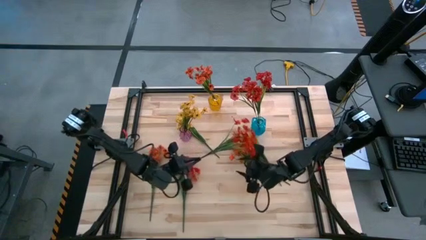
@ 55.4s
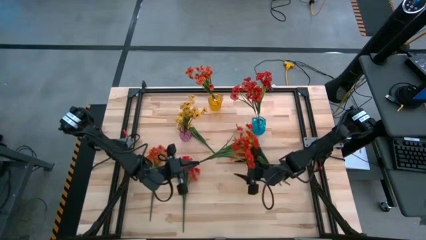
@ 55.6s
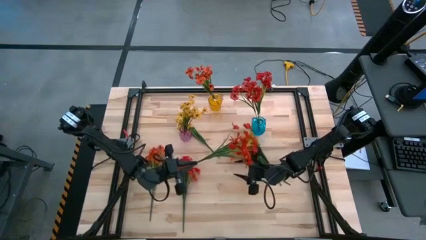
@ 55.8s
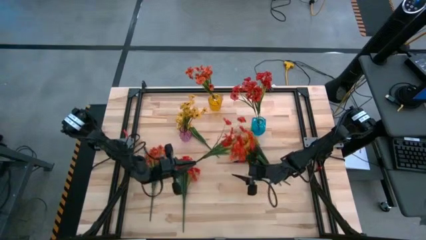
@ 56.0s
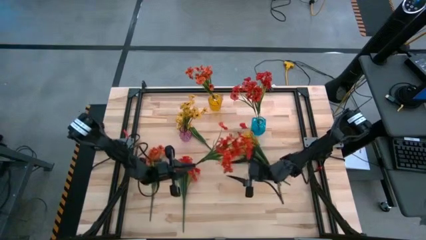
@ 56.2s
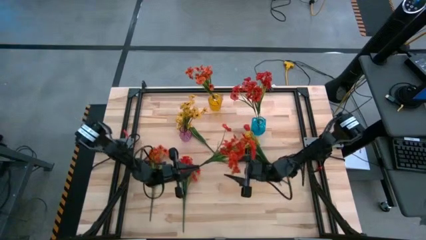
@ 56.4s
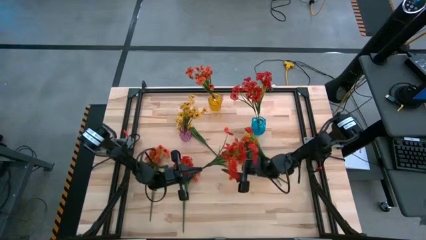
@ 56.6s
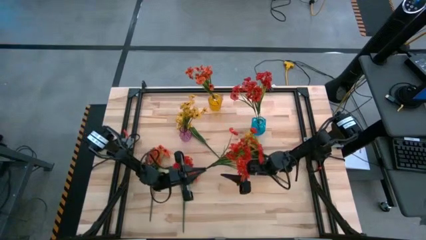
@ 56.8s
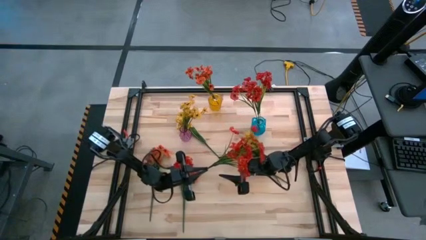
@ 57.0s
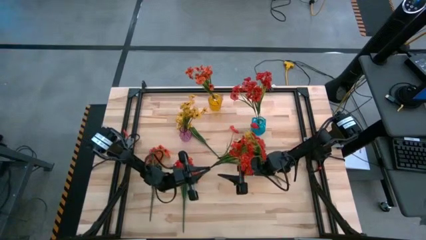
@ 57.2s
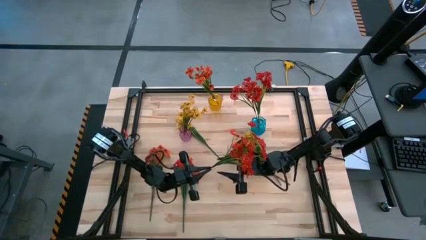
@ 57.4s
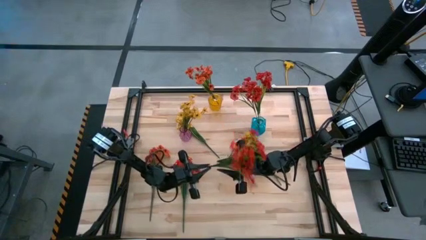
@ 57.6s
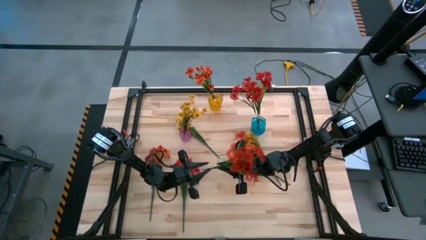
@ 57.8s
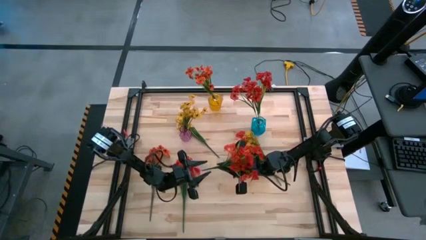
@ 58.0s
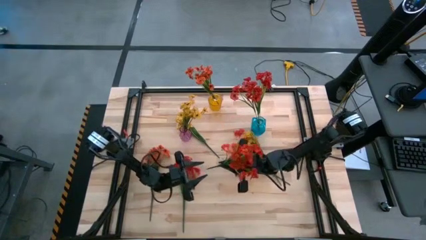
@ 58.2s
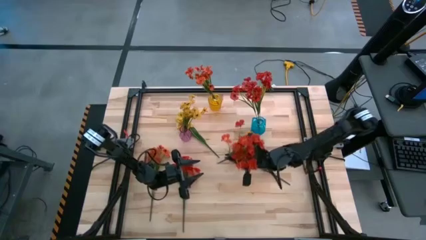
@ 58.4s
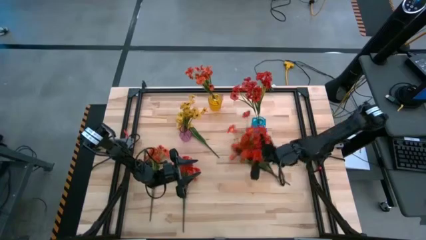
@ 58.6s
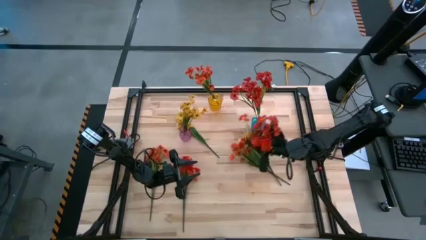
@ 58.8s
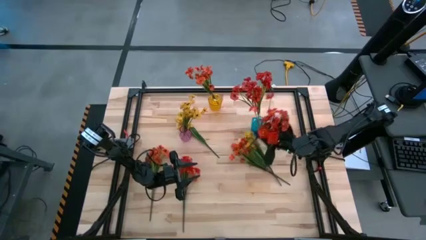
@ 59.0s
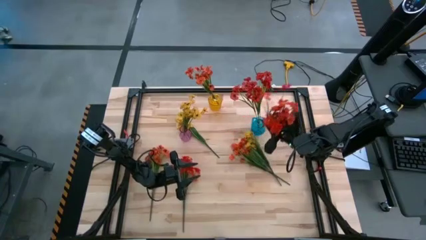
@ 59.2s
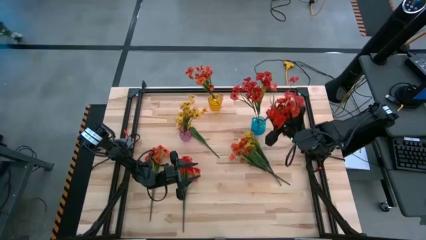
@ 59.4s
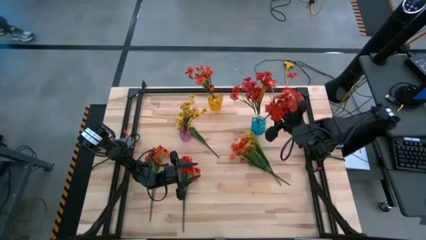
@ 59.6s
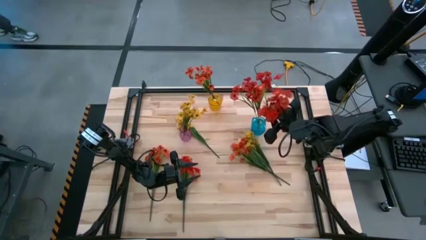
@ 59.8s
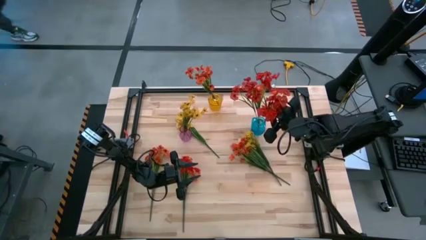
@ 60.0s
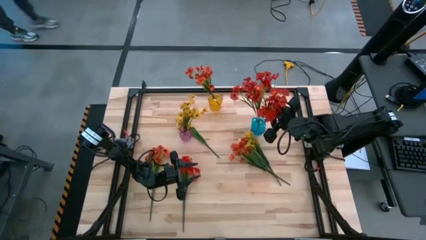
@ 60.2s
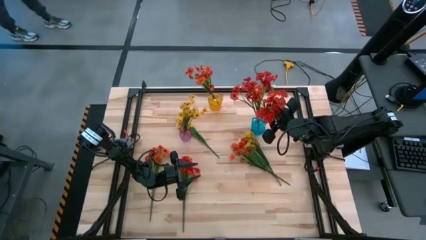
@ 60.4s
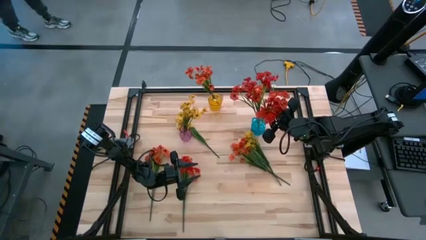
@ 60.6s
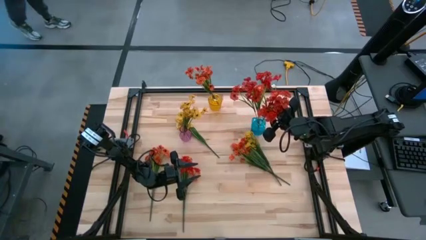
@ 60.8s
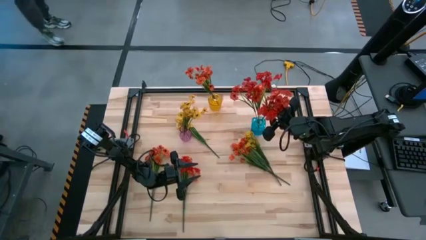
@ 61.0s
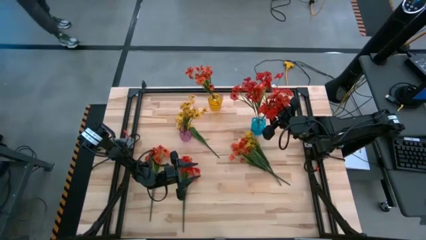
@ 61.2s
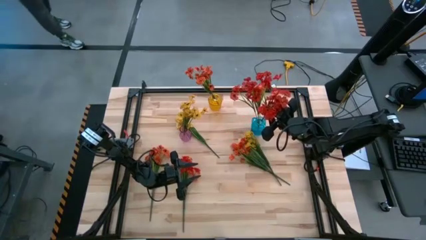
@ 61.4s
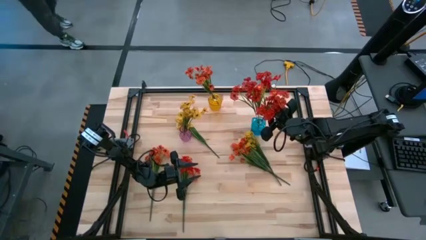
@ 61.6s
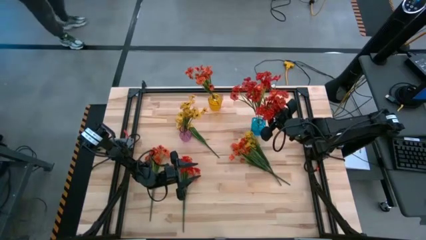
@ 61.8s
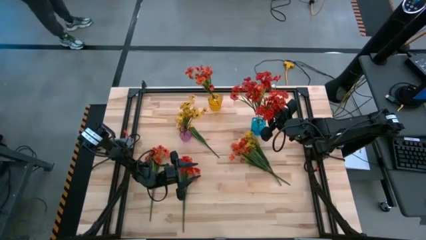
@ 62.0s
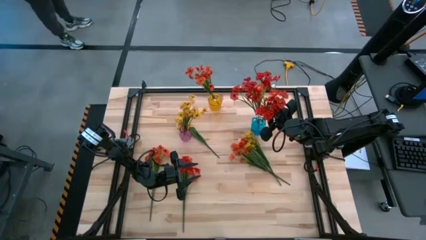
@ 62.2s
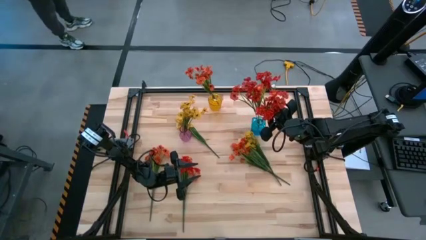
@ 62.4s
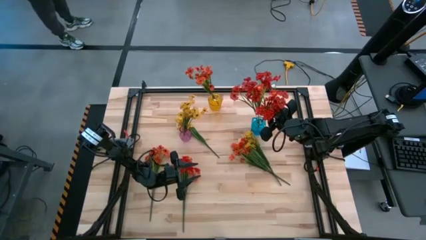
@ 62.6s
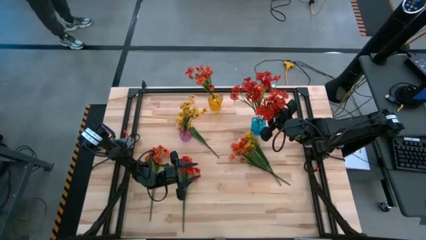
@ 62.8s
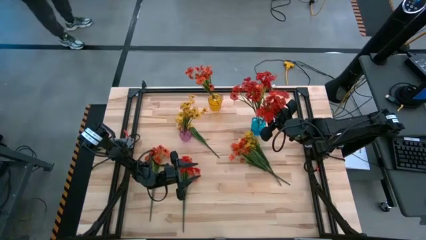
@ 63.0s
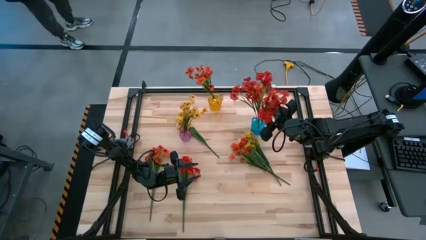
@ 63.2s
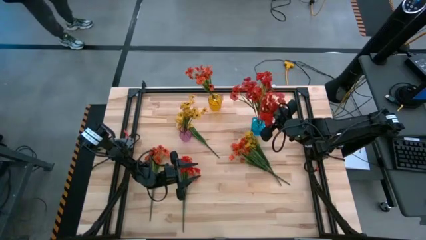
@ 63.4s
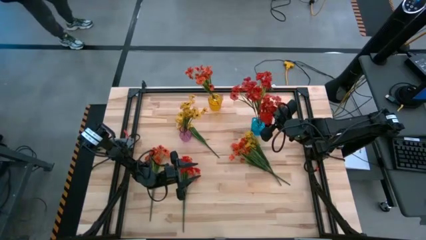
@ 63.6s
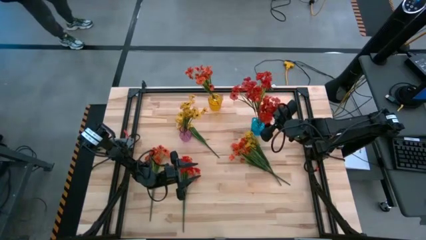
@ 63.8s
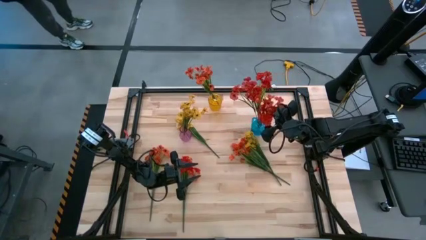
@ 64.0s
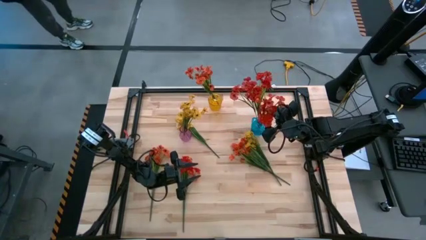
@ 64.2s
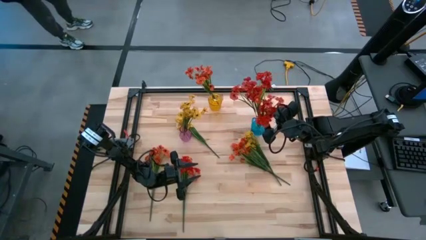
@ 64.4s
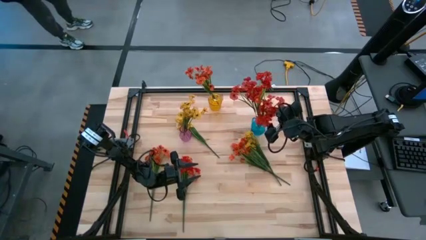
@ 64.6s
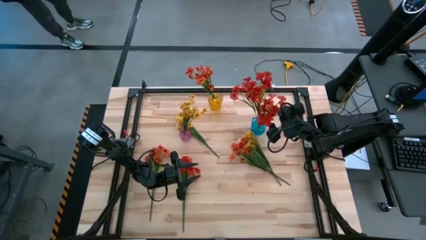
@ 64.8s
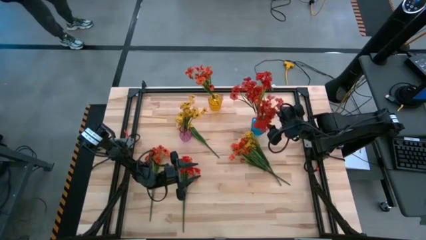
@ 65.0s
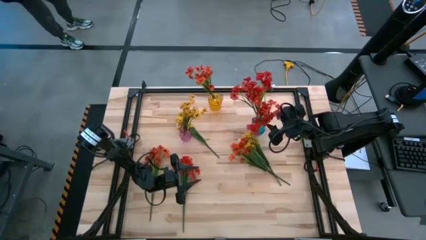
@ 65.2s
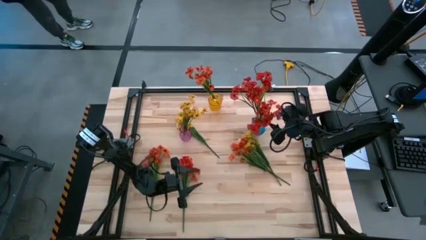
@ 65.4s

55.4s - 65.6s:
Task: Sort flowers into vase by color
Put the top red flower into the blue vase

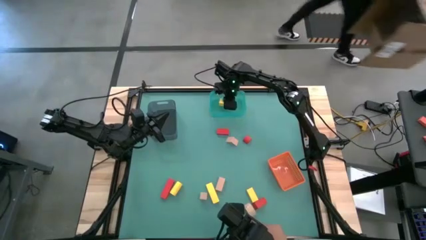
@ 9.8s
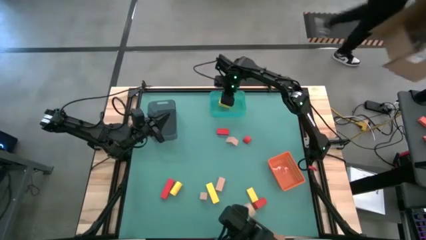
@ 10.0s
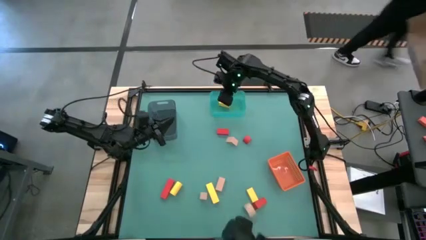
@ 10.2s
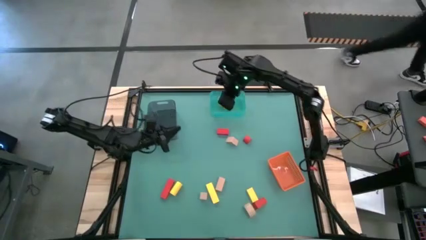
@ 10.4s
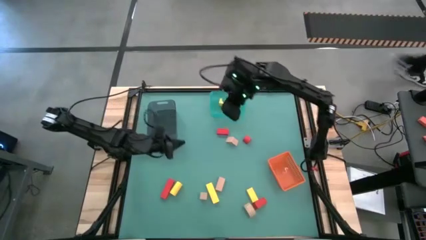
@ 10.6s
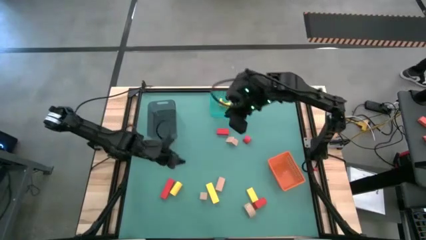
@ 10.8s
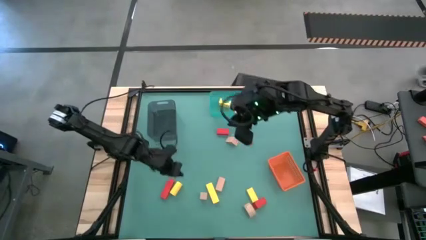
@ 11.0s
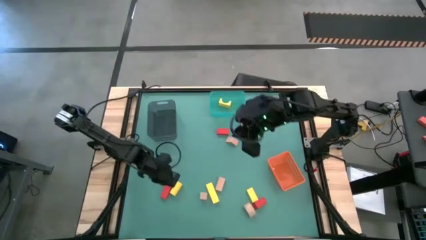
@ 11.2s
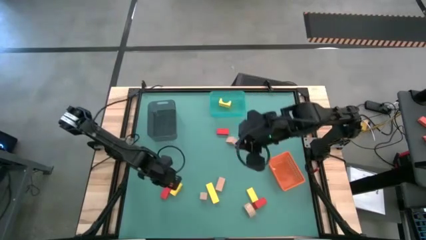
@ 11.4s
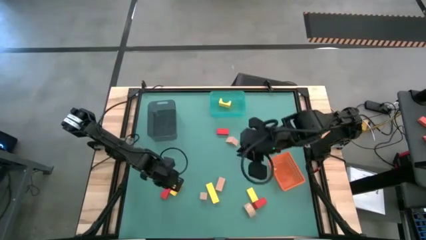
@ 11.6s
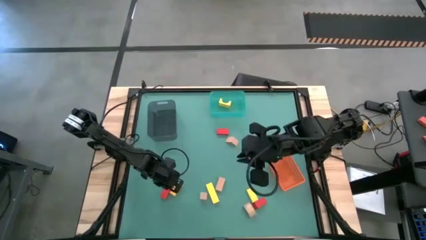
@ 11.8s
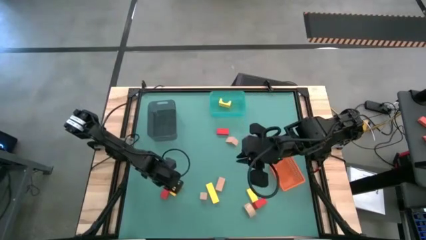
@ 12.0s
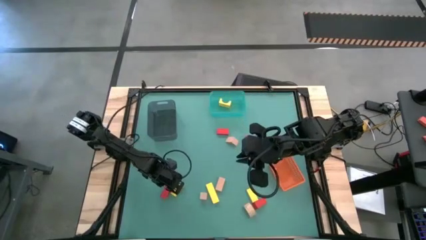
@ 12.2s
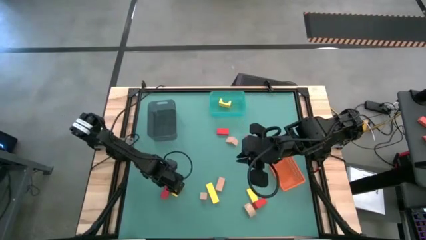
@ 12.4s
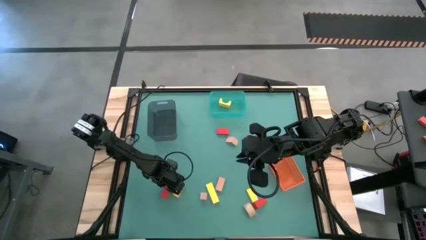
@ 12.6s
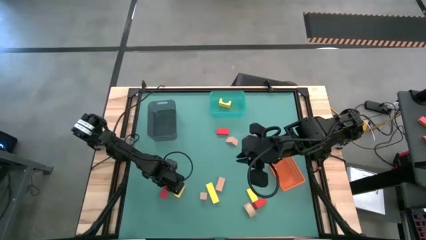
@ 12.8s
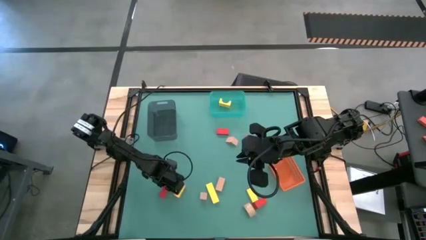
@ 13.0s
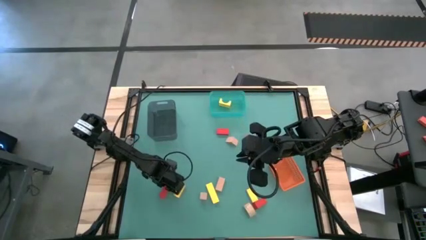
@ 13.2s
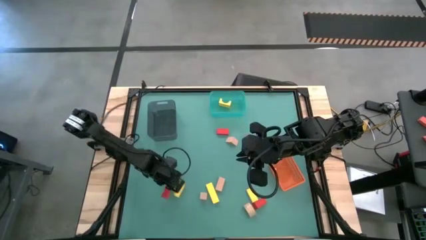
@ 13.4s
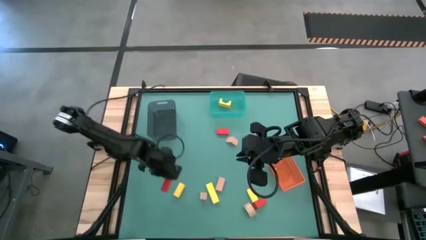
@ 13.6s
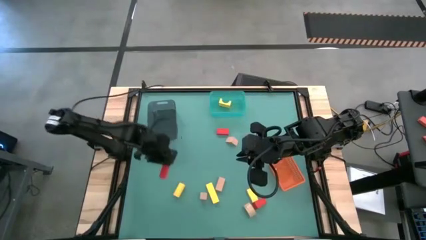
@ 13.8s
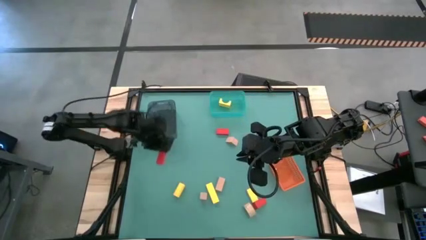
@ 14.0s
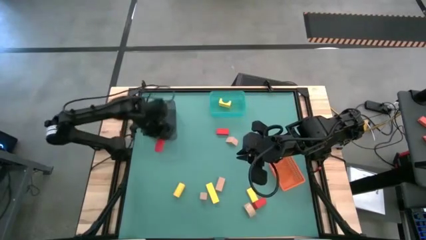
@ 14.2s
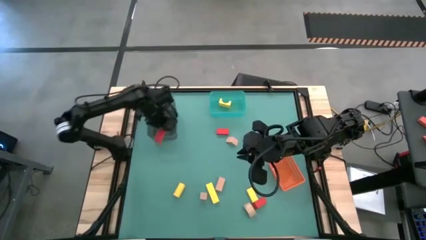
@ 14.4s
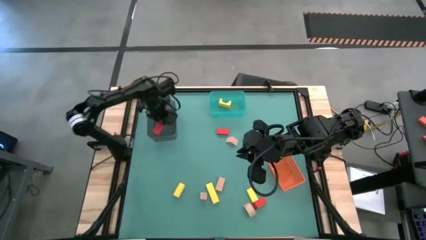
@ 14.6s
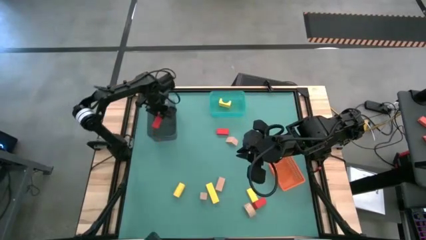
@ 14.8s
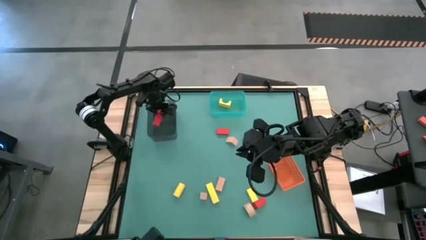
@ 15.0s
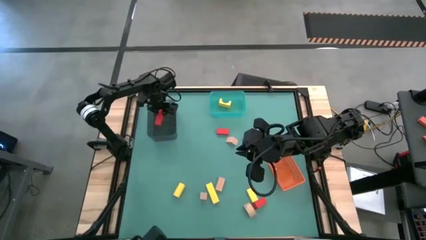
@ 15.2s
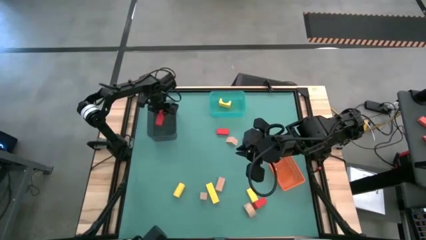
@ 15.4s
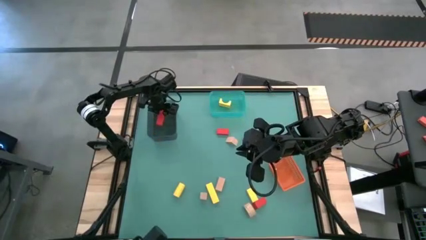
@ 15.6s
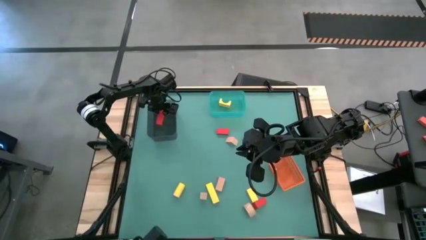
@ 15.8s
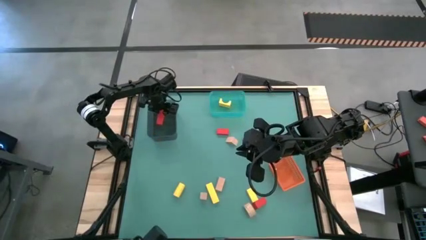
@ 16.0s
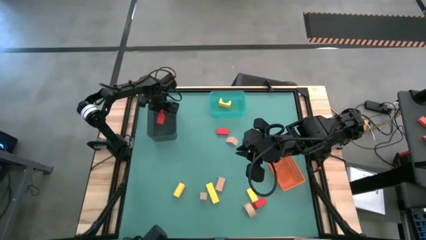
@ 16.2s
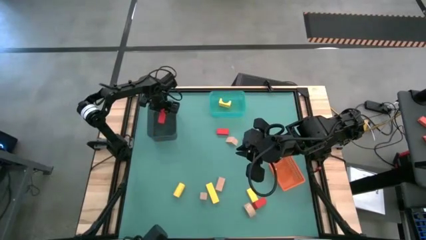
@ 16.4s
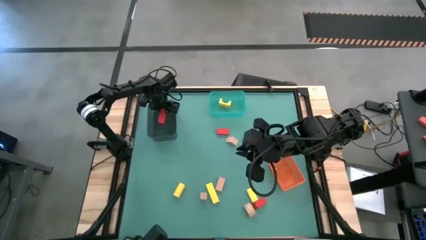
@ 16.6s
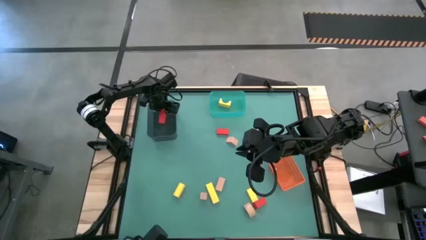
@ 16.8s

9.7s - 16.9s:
Task: Sort & place blocks by color
Put the red block into the black bin
